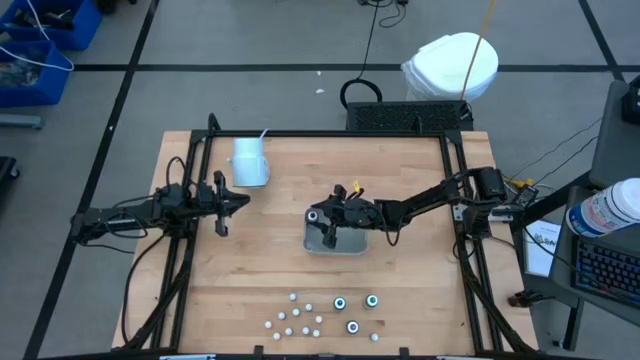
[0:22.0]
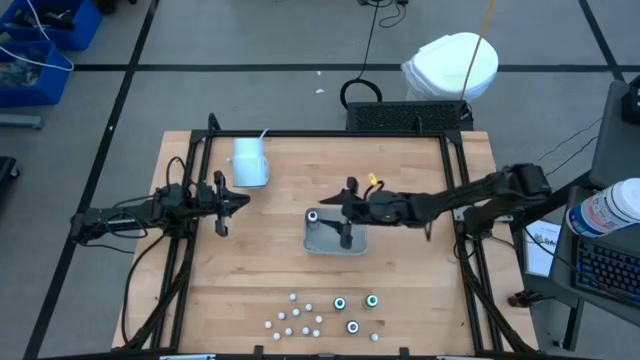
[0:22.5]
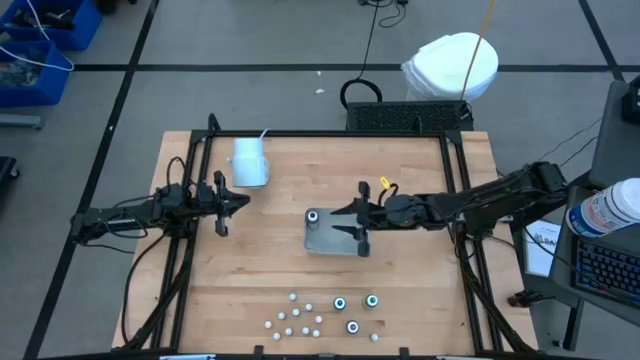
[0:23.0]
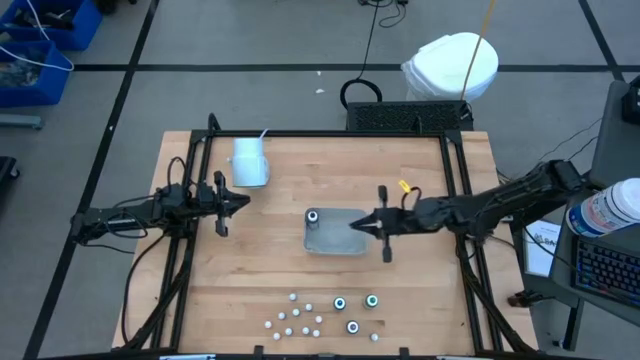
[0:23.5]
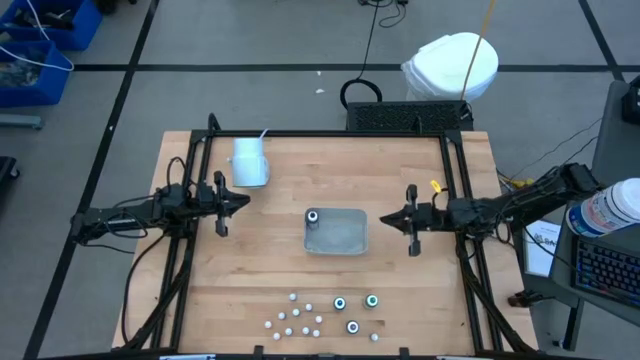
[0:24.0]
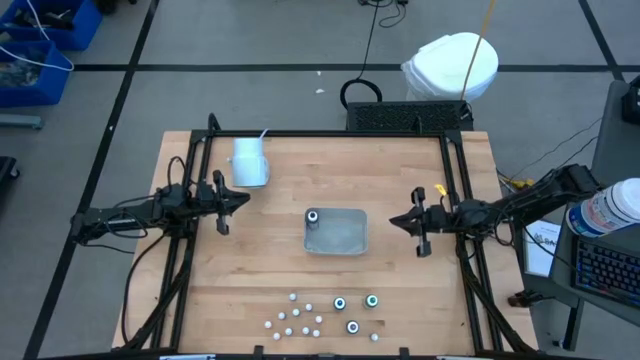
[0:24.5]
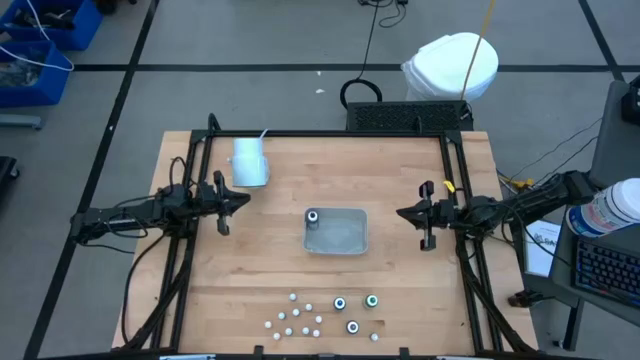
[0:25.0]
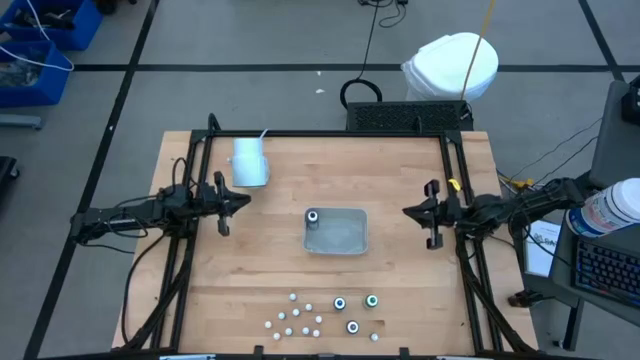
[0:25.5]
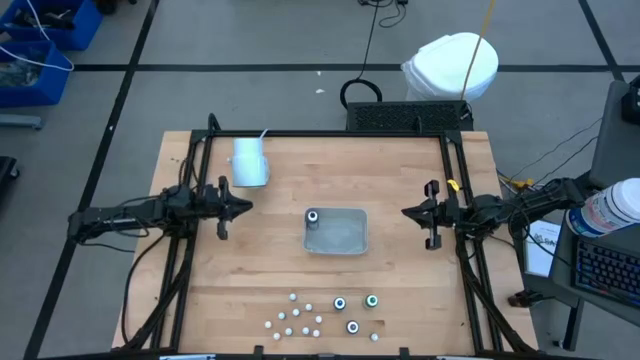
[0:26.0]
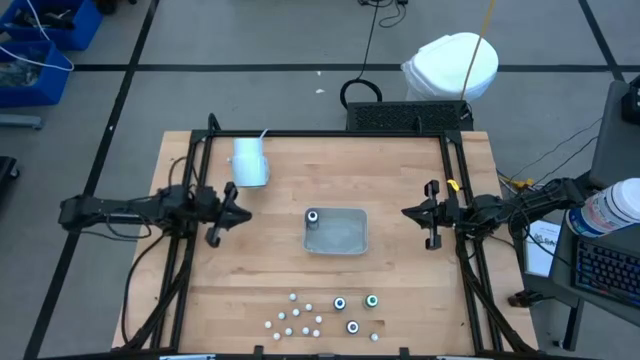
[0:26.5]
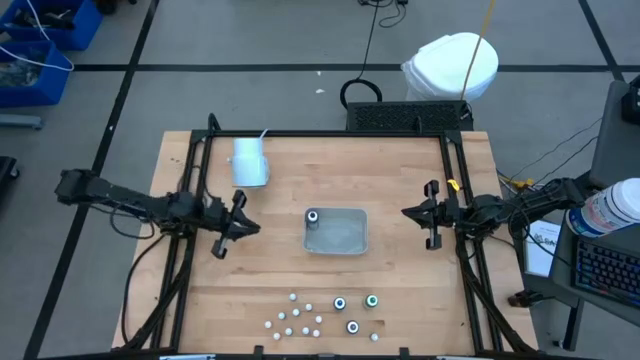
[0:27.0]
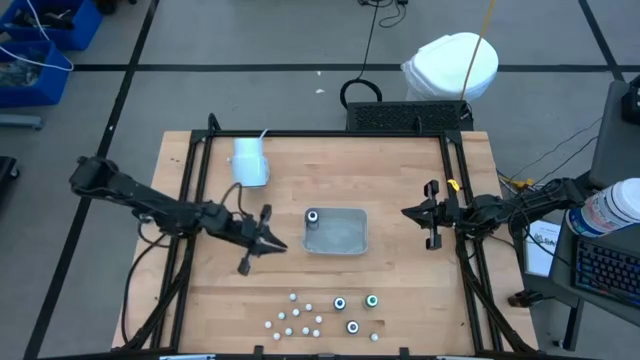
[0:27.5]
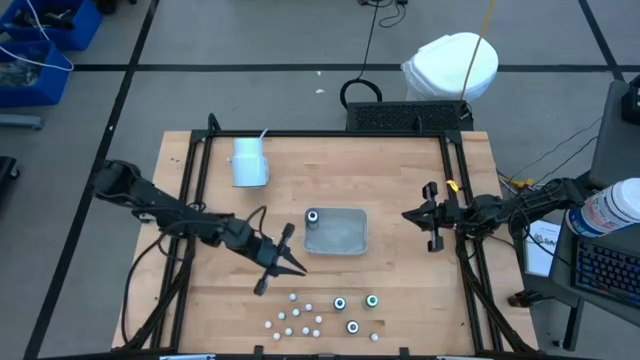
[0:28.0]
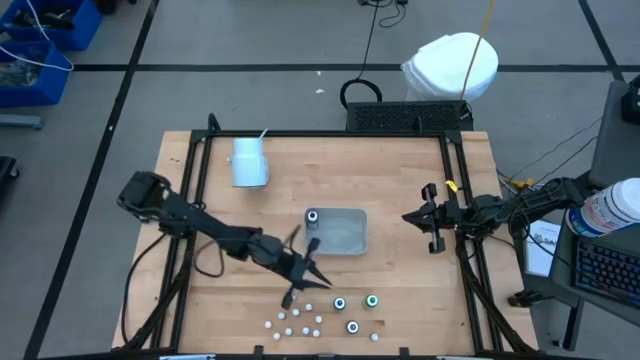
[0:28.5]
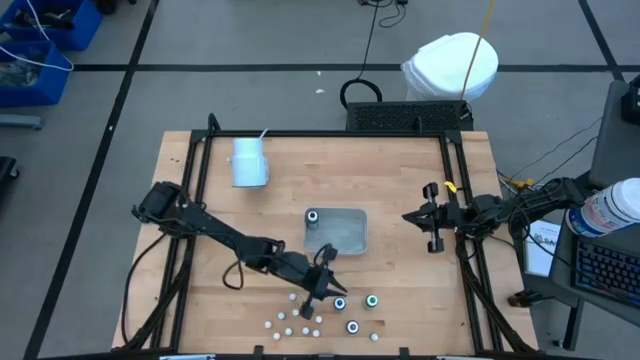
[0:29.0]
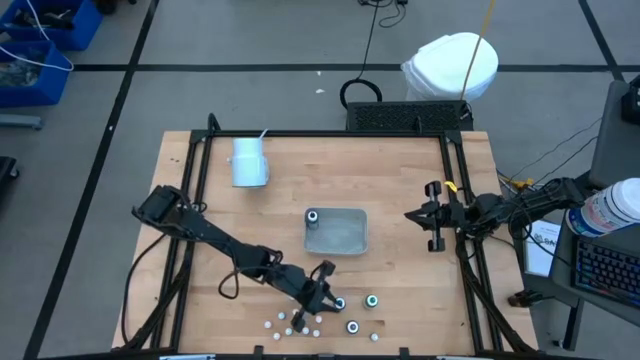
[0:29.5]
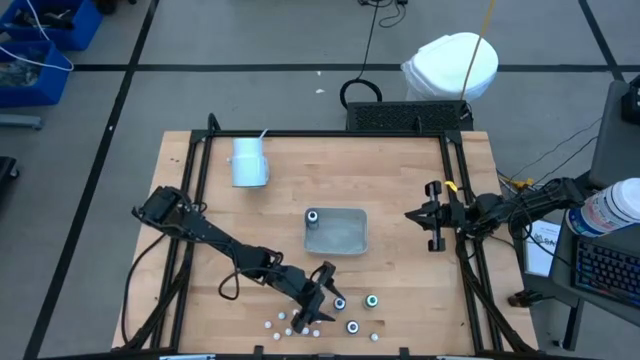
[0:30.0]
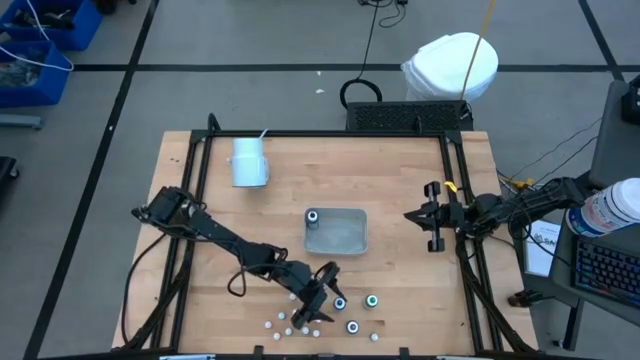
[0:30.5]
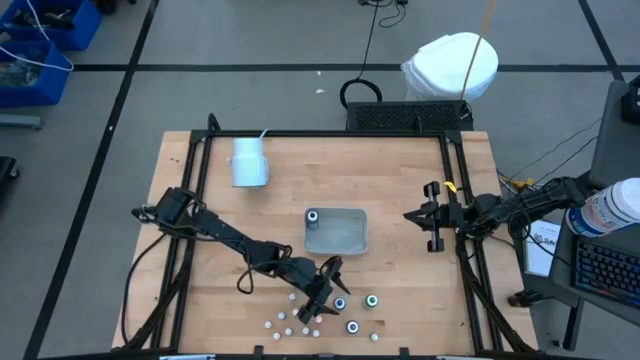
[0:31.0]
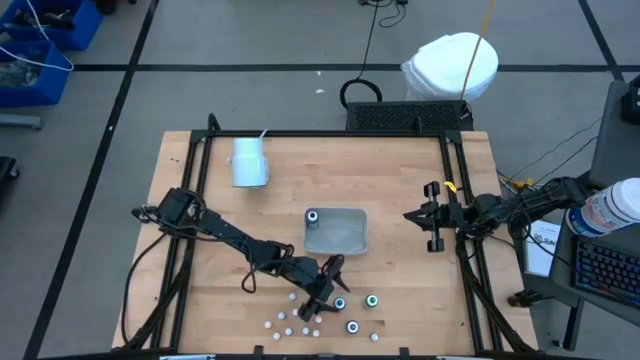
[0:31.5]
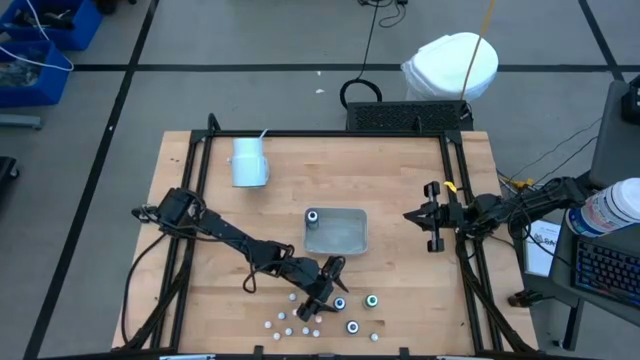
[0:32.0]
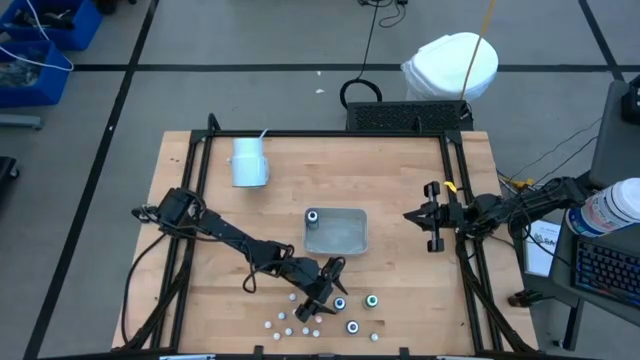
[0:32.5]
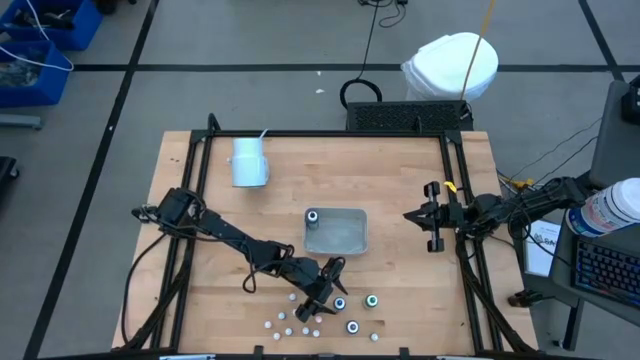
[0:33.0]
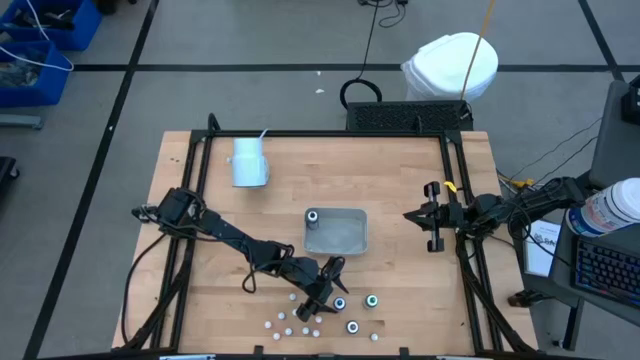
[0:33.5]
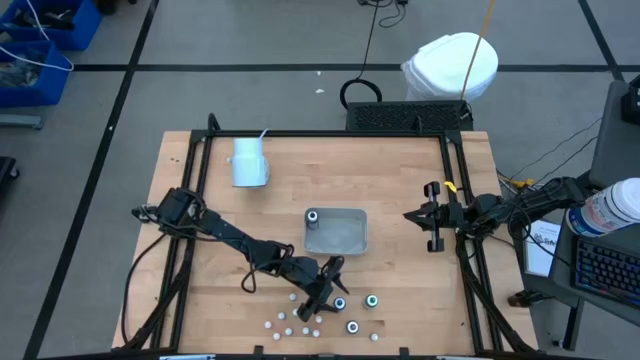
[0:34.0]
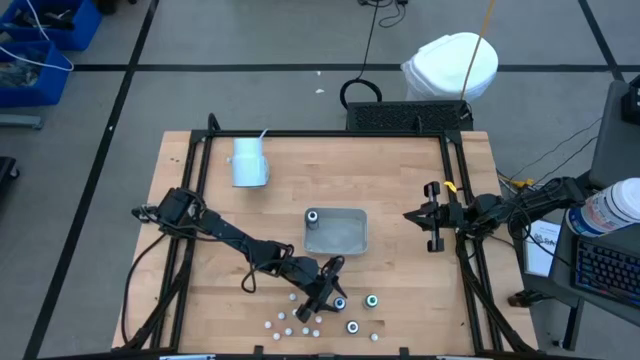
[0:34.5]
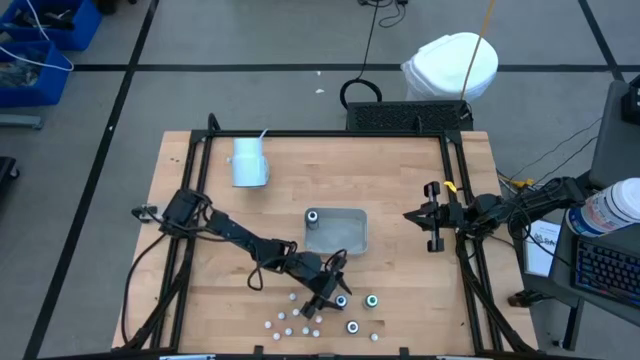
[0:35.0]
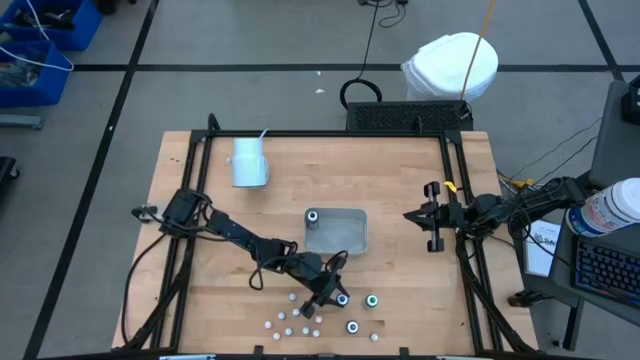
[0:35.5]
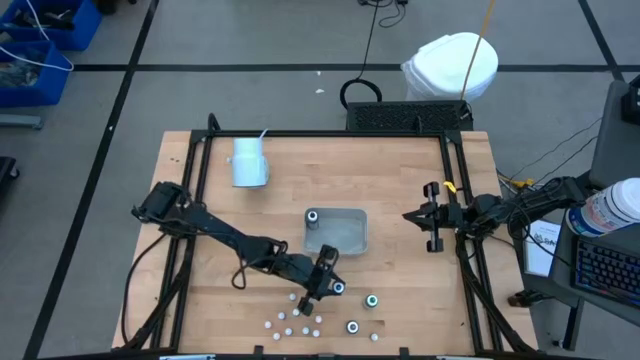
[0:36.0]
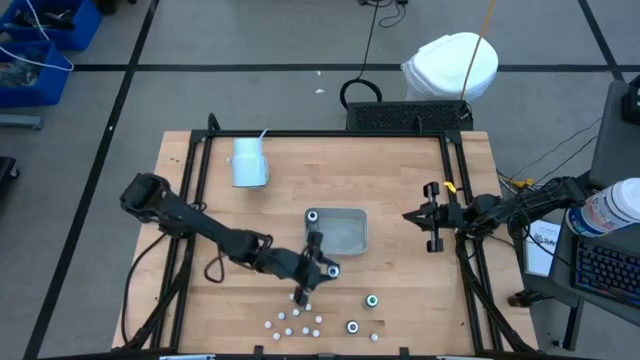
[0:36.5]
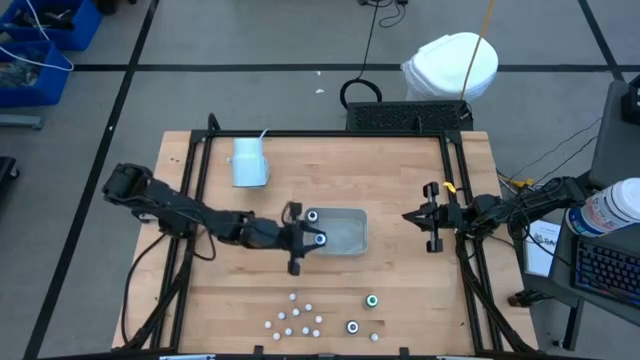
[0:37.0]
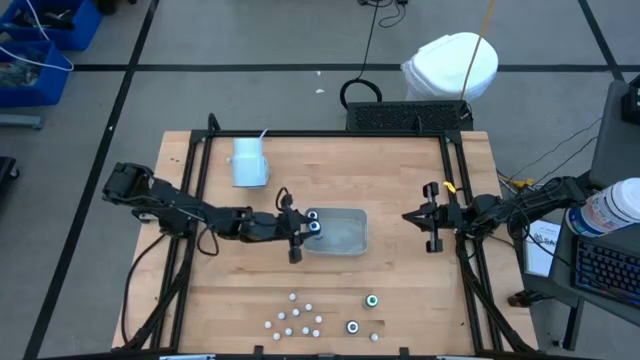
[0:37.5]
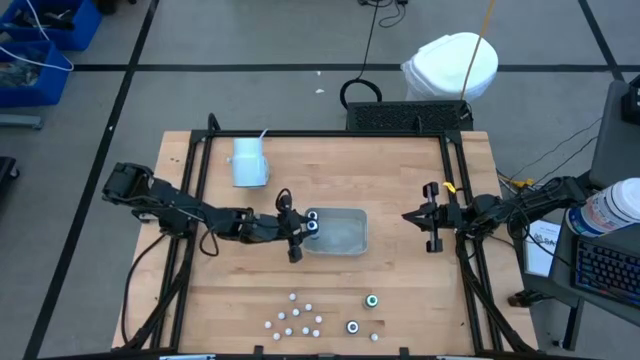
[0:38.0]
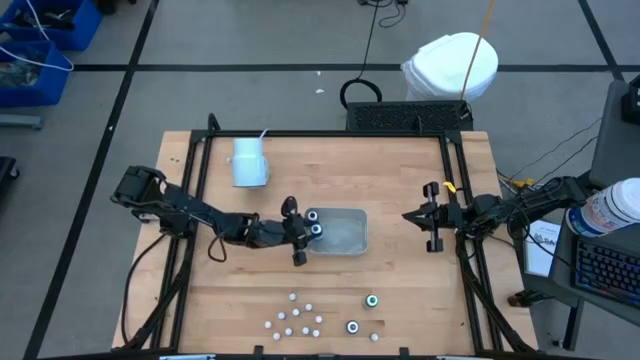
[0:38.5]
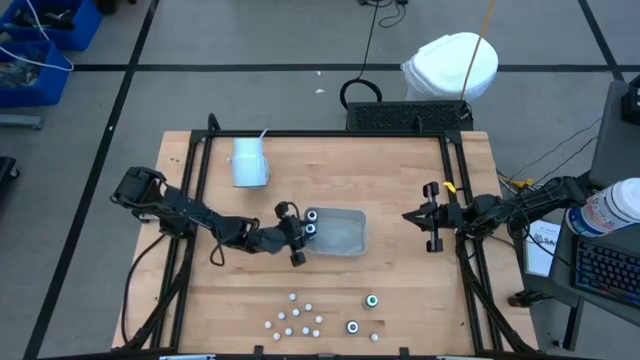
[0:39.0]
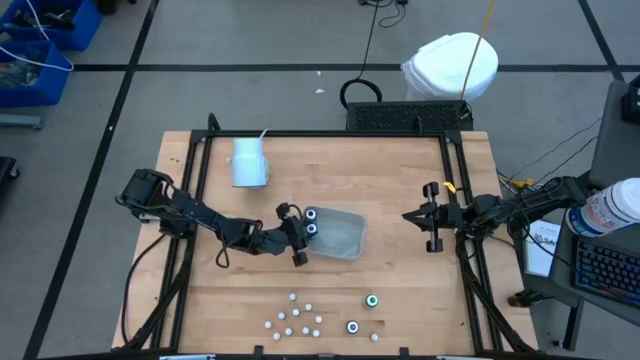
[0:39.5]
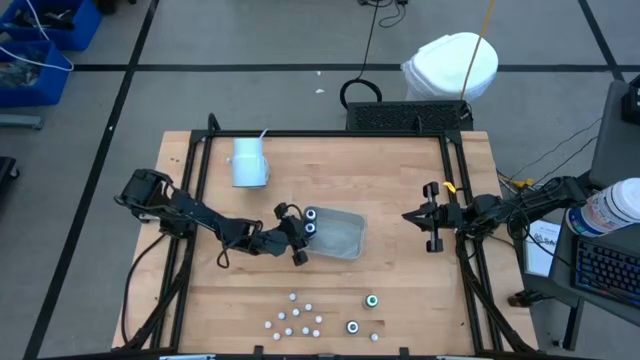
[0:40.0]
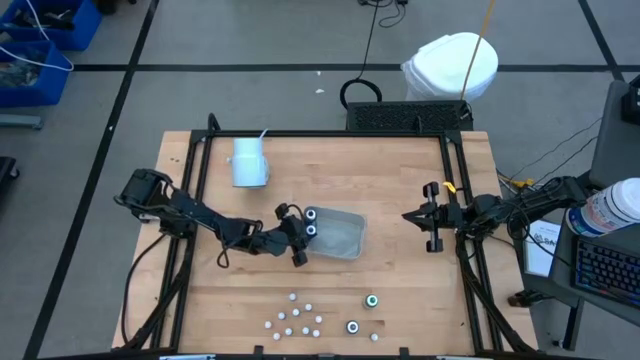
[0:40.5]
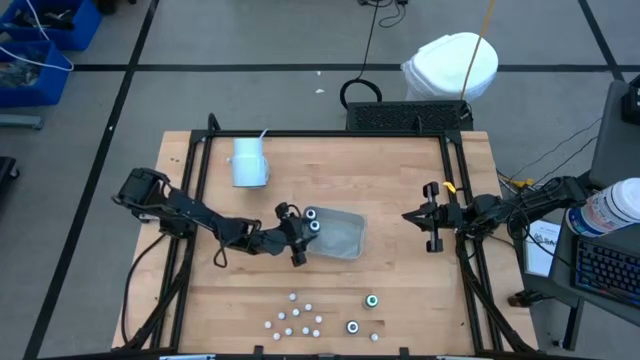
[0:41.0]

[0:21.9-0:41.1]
Task: Pick & Place food coloring
Put the large blue food coloring bottle into the white container

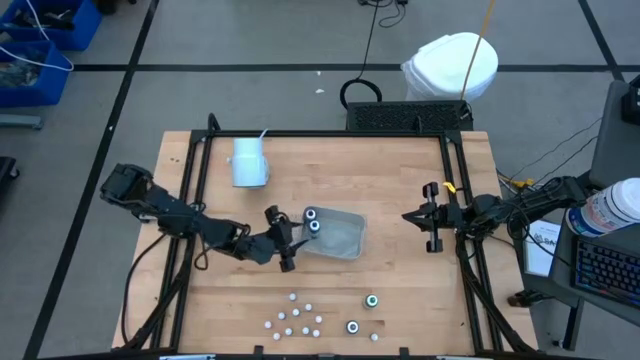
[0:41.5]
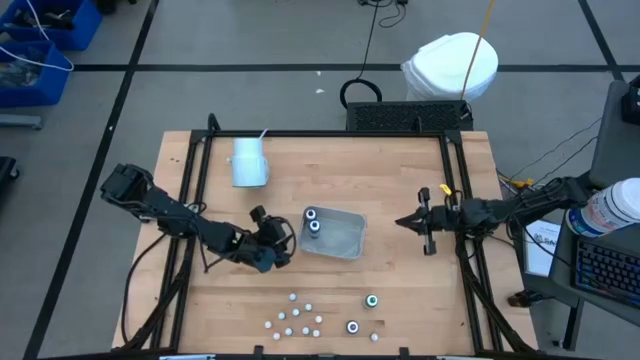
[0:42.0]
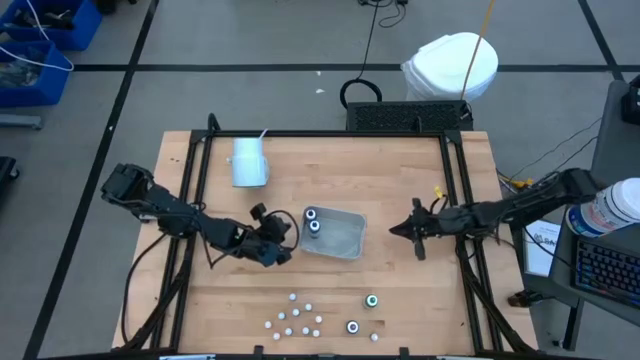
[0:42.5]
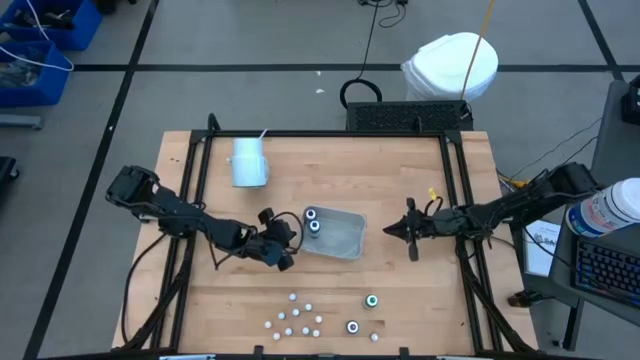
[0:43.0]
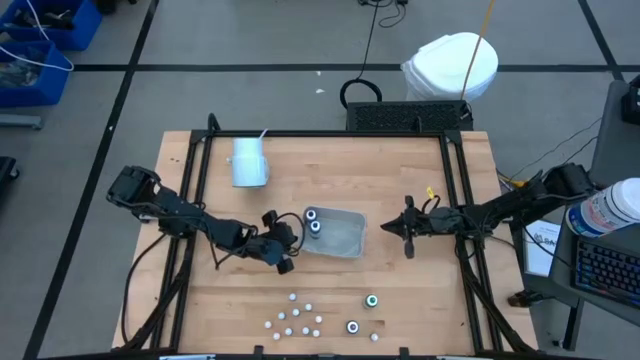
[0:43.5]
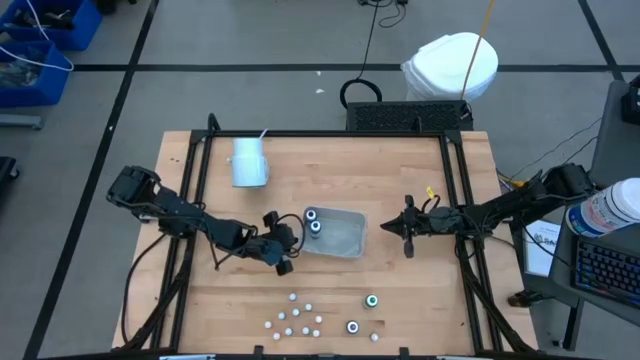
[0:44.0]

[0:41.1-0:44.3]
Adjust the white container
